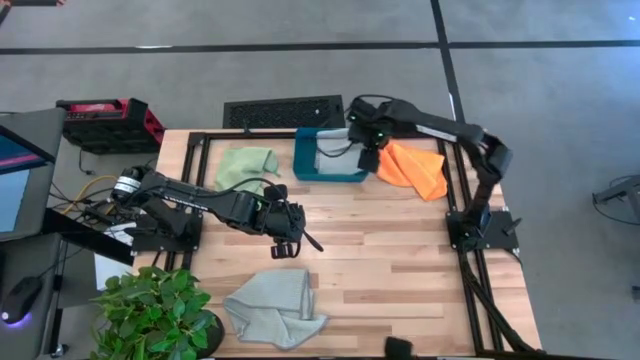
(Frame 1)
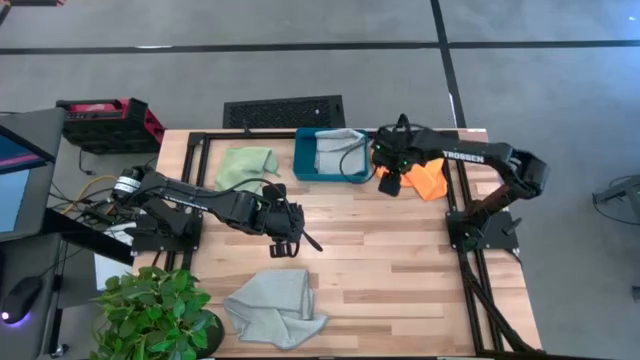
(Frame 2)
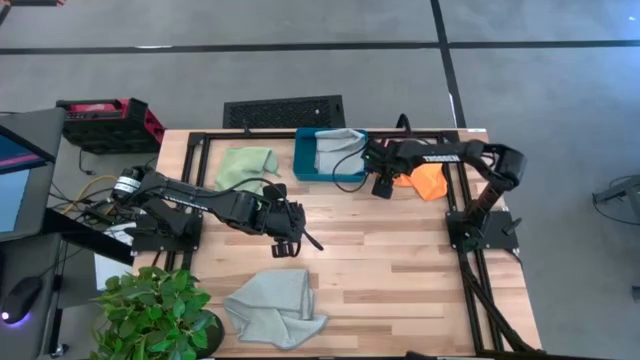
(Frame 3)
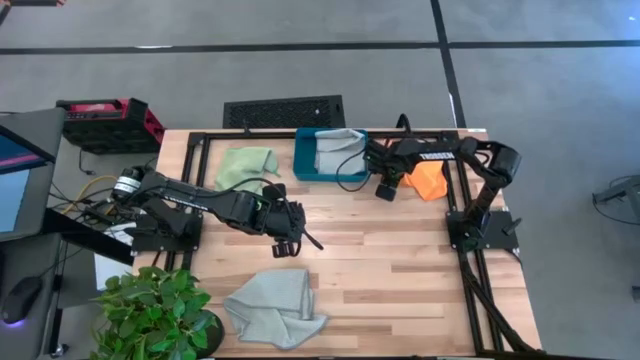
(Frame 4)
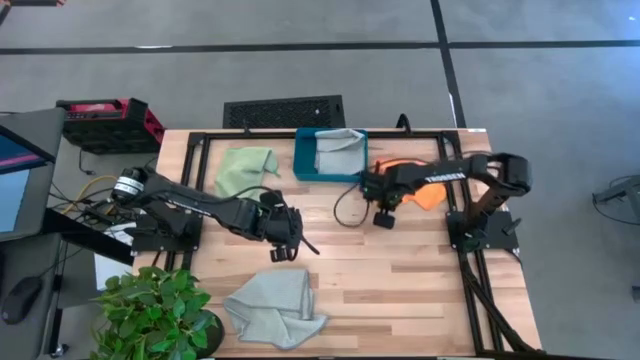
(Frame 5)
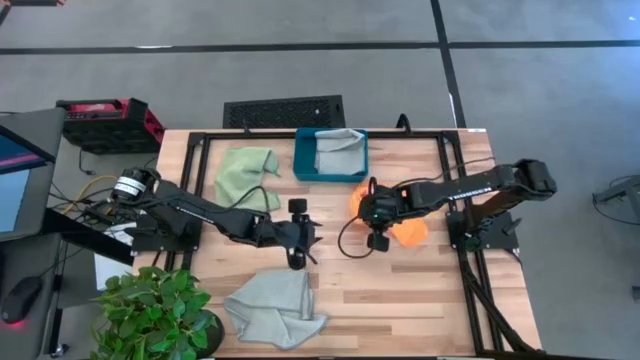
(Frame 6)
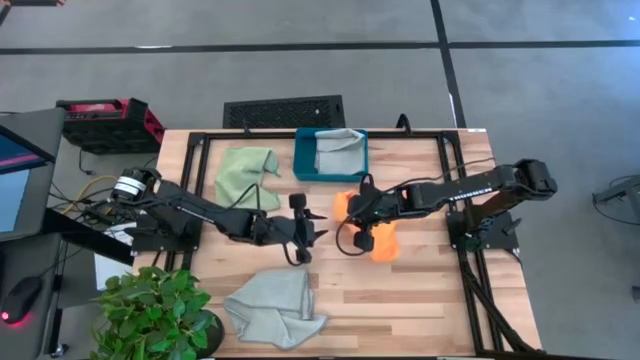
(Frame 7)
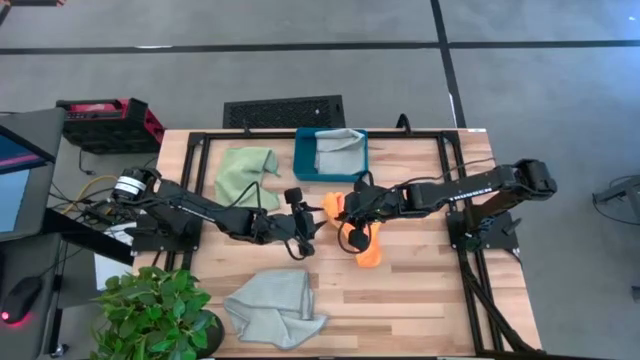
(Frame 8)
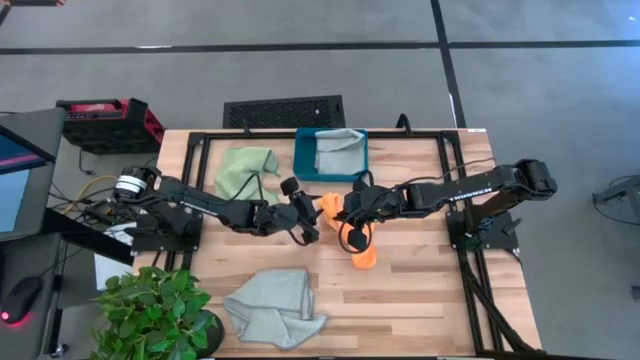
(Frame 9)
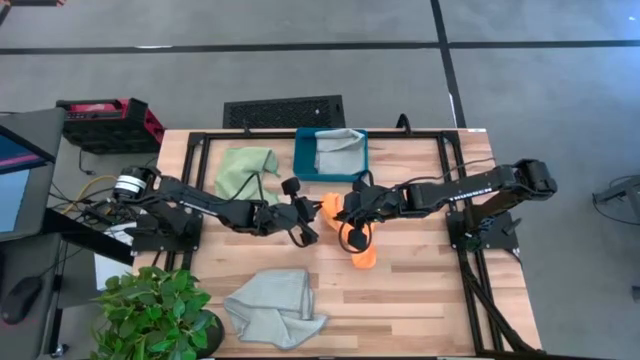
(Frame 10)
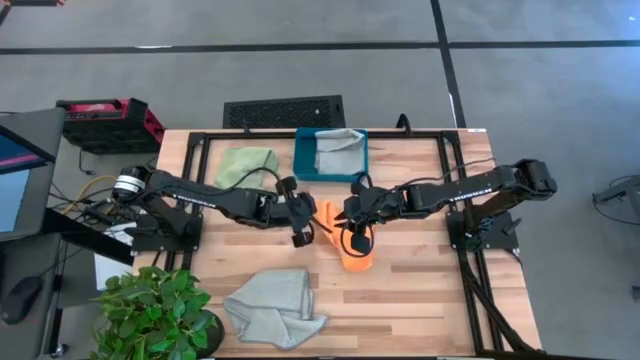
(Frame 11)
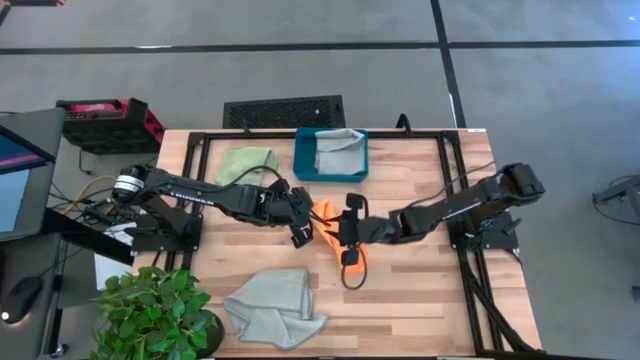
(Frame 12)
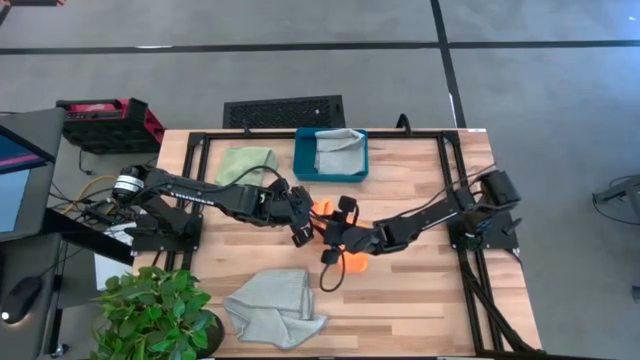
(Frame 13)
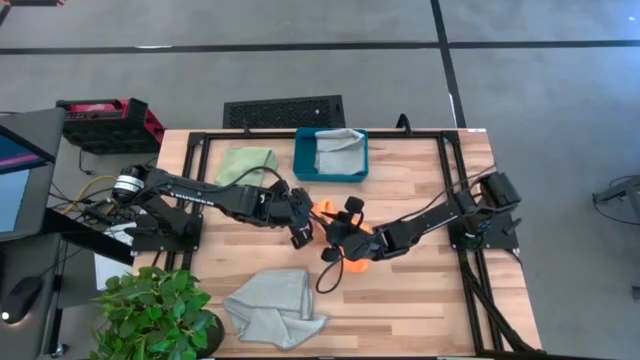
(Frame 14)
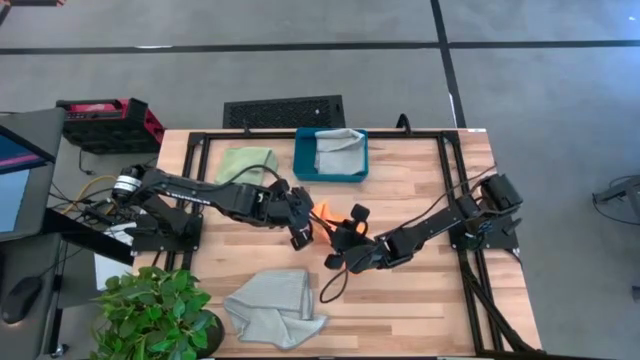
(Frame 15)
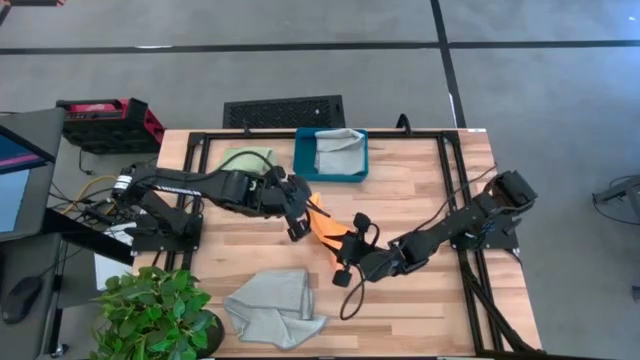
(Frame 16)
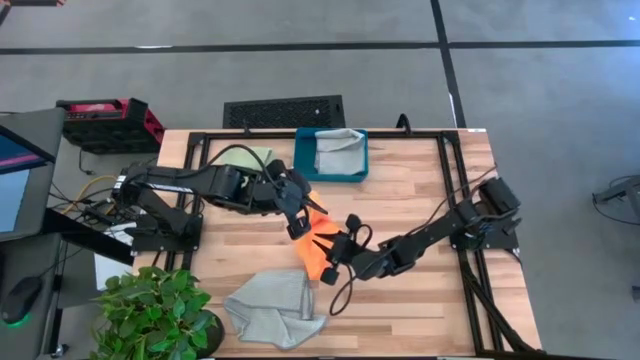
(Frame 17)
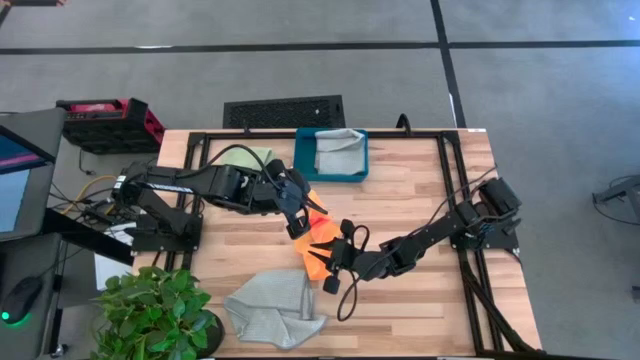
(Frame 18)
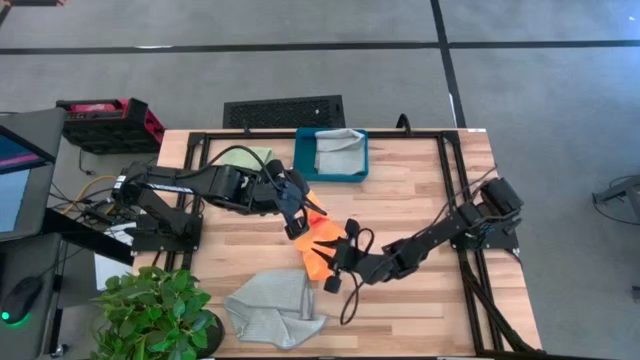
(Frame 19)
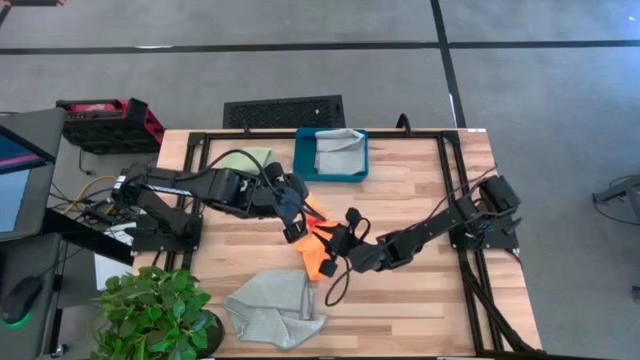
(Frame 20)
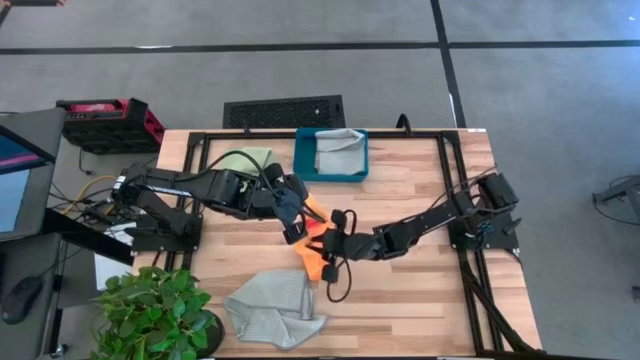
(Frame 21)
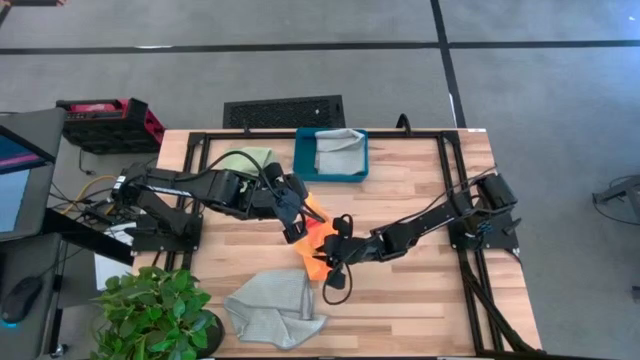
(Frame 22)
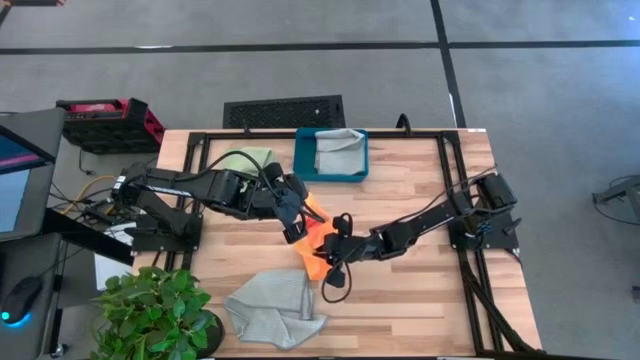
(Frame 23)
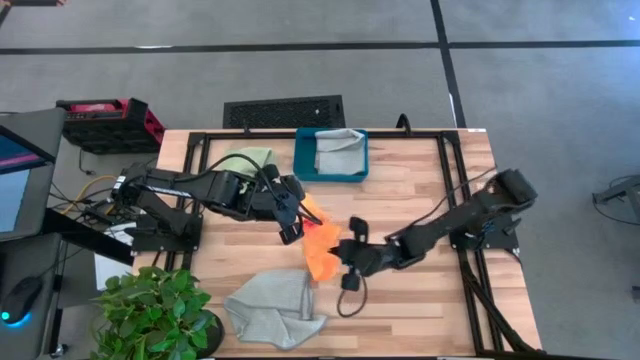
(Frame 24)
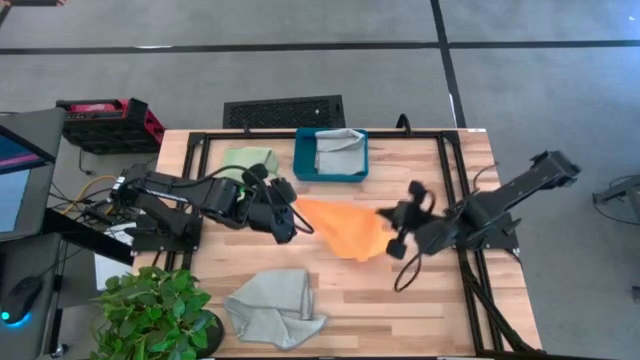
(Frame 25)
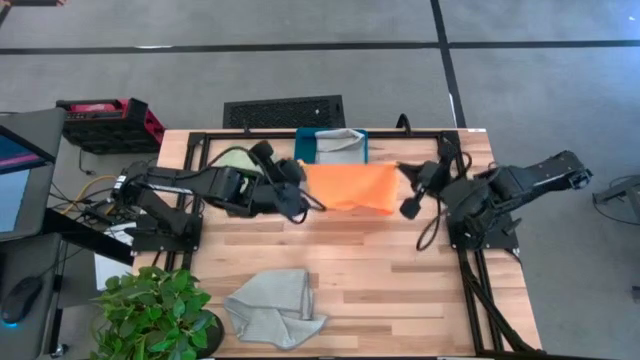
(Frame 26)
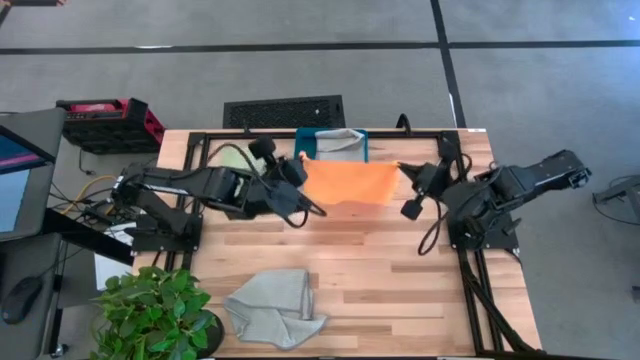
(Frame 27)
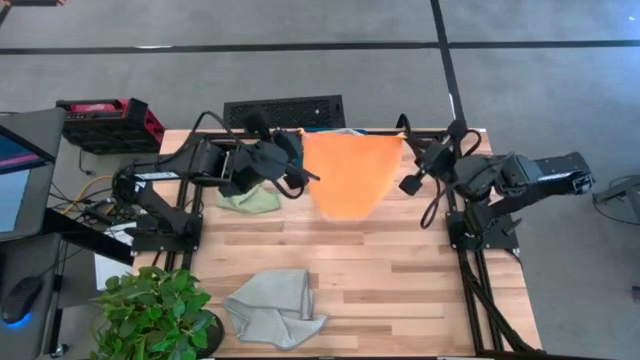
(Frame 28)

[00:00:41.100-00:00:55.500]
Task: Fold microfiber towels
Fold the orange towel

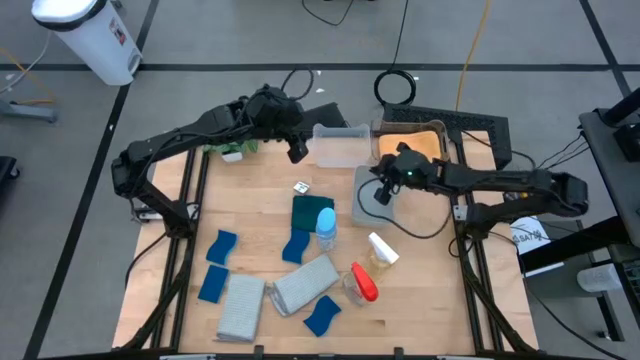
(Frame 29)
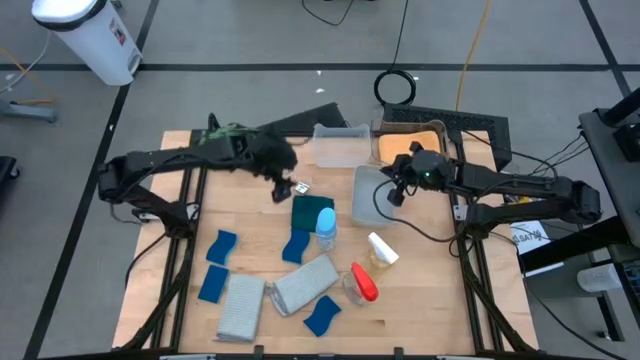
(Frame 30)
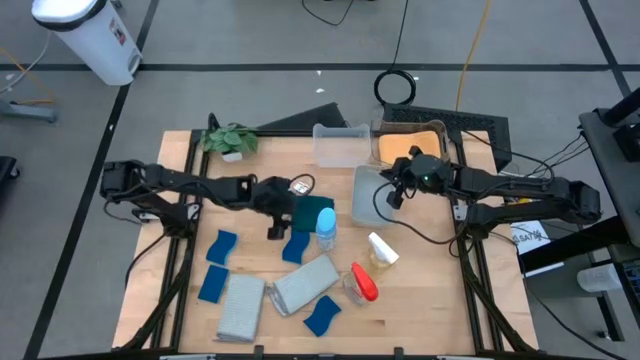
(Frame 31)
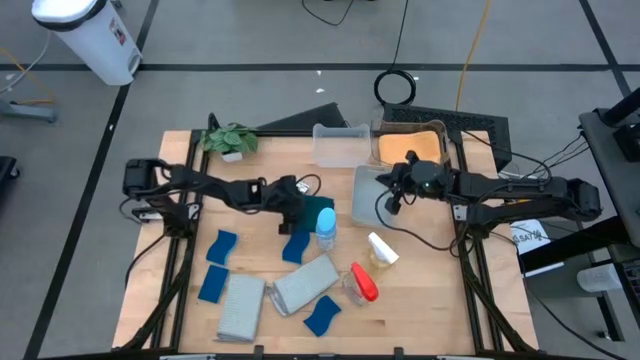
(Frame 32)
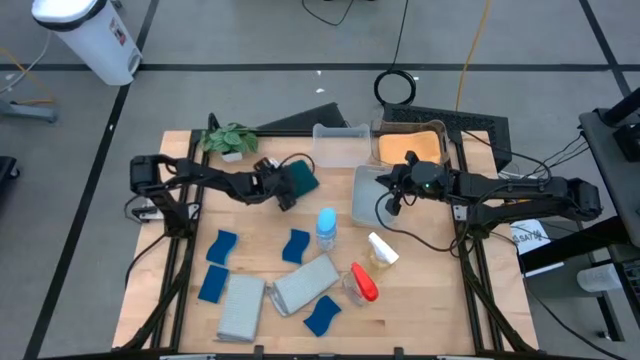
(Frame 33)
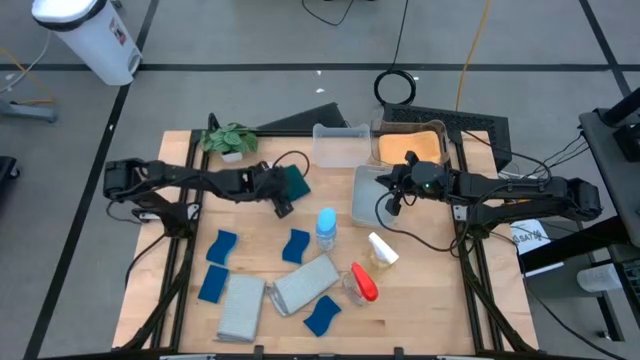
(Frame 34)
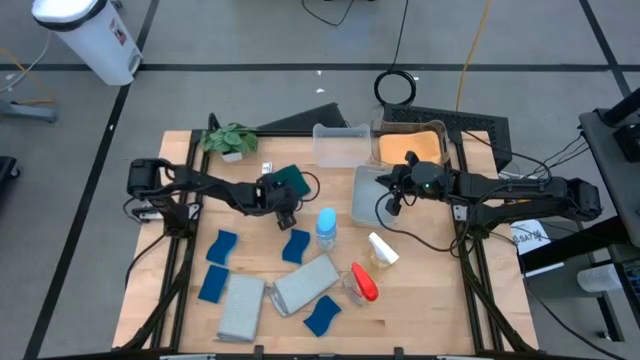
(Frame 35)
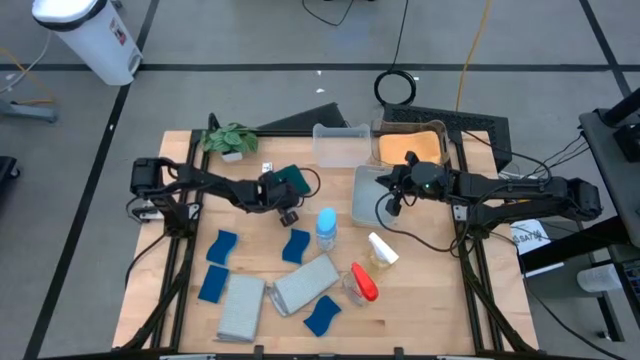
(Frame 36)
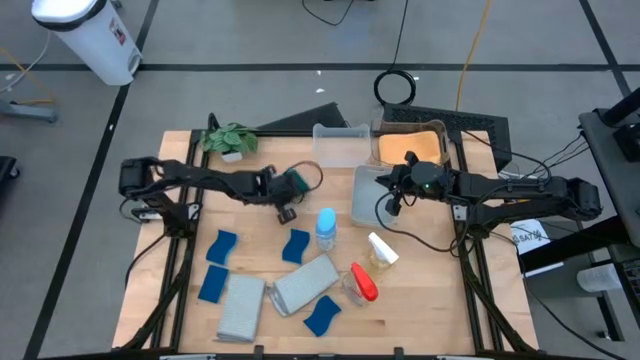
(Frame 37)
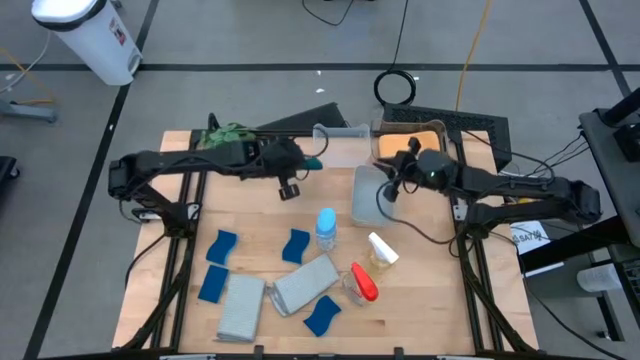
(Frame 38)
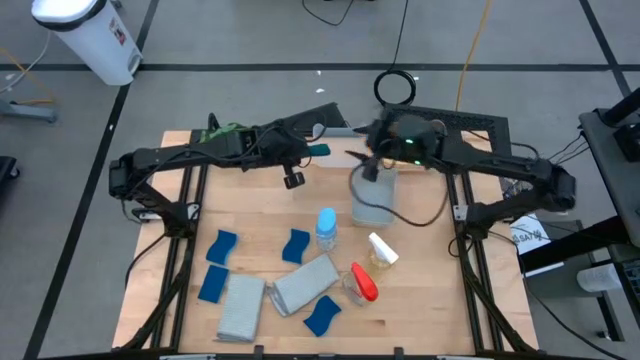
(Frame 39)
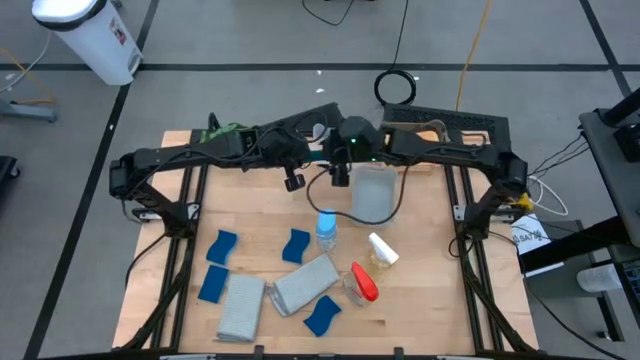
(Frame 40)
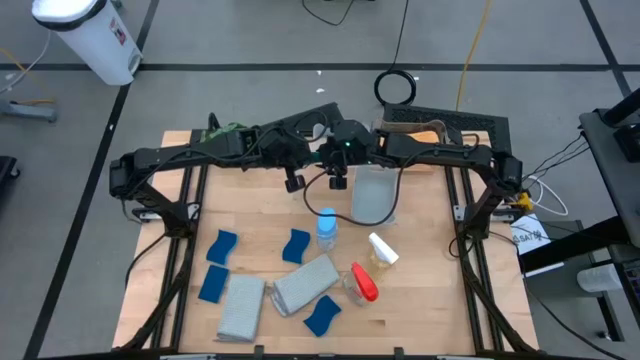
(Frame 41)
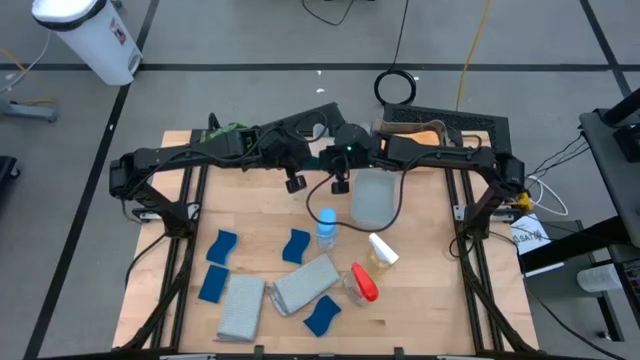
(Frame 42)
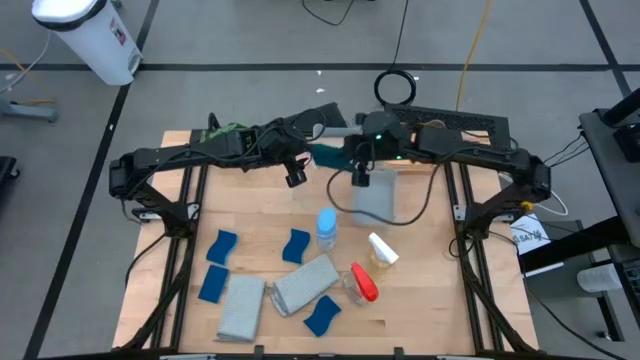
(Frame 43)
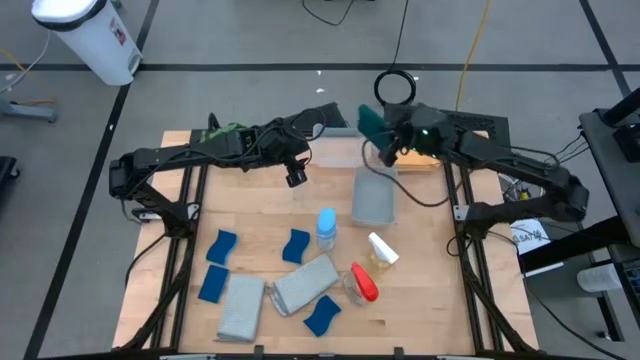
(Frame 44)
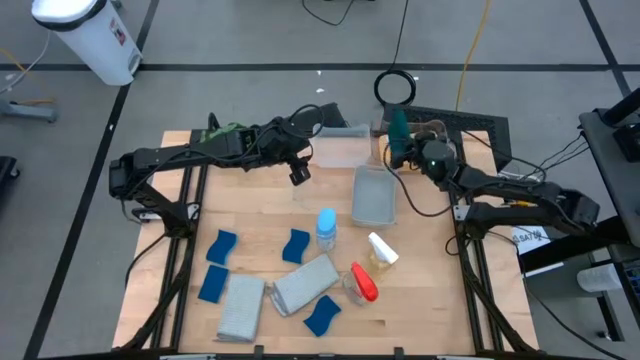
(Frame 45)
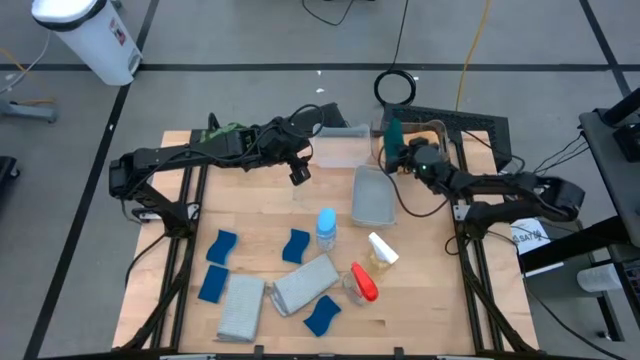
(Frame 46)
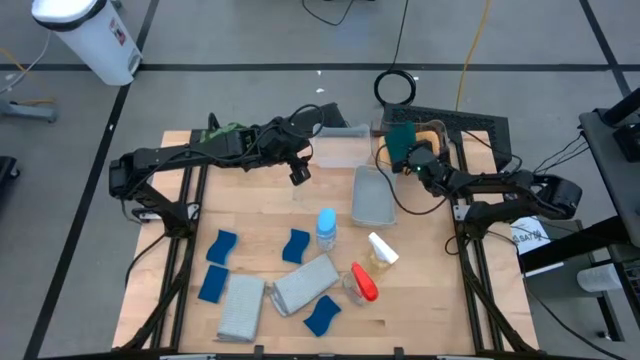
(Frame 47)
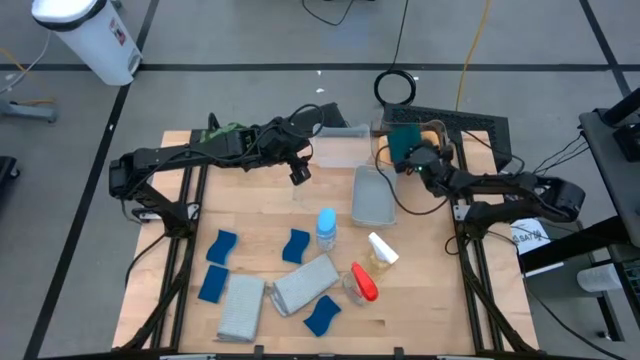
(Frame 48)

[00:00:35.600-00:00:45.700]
Task: Pick & Place Kitchen Items
Put the green towel into the transparent bin
